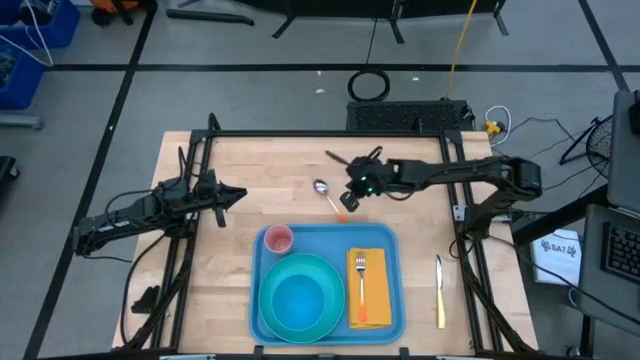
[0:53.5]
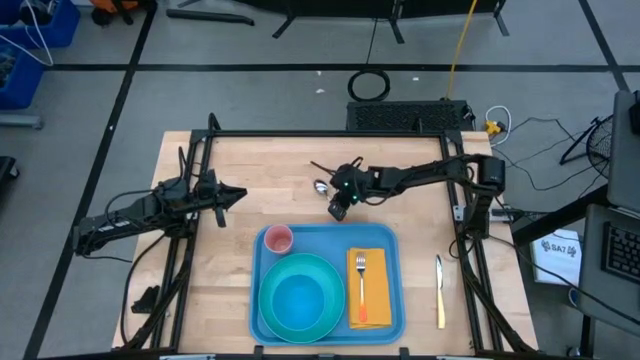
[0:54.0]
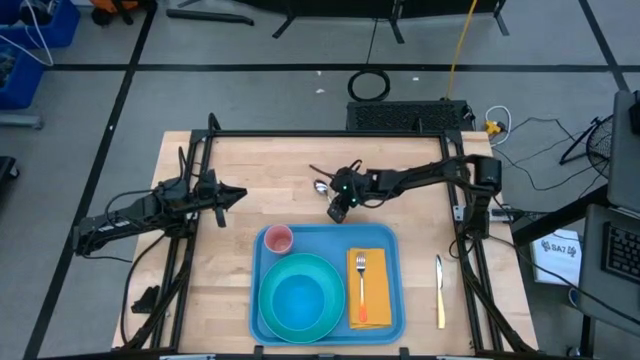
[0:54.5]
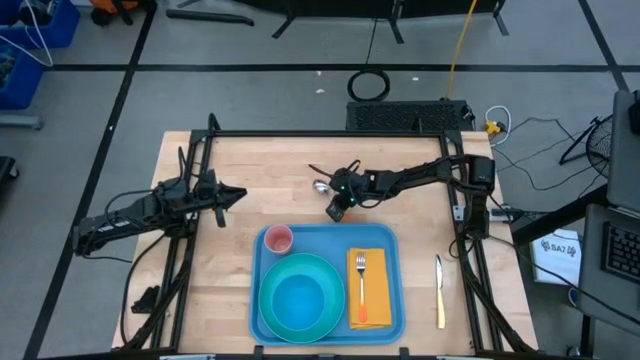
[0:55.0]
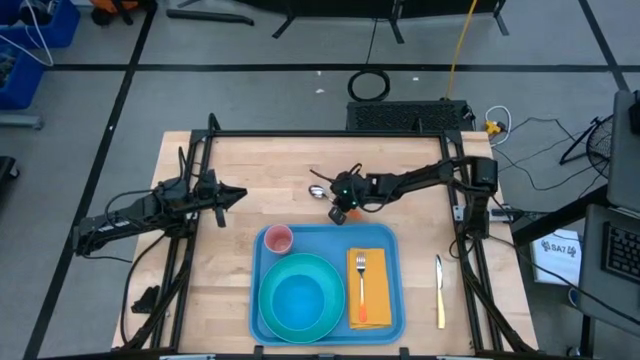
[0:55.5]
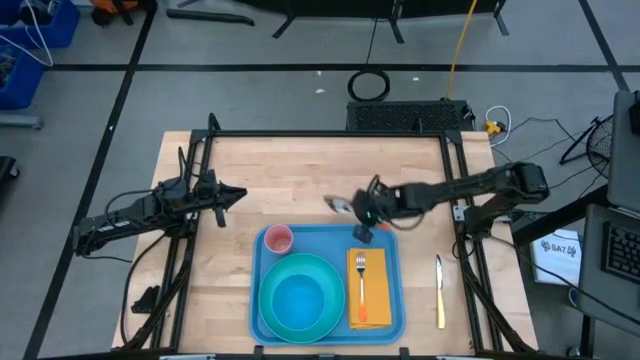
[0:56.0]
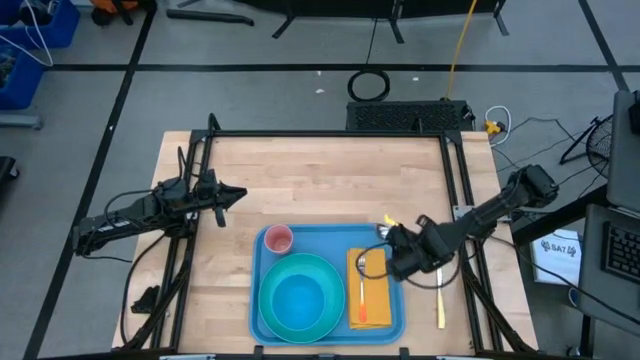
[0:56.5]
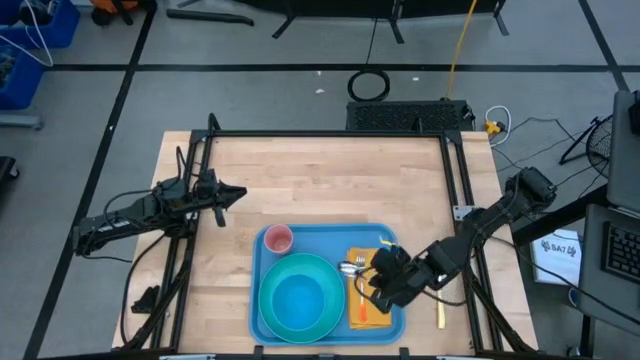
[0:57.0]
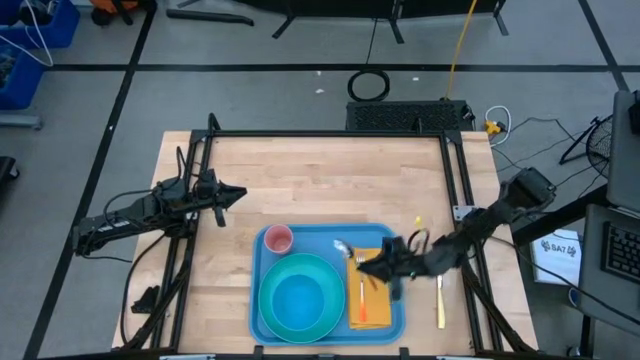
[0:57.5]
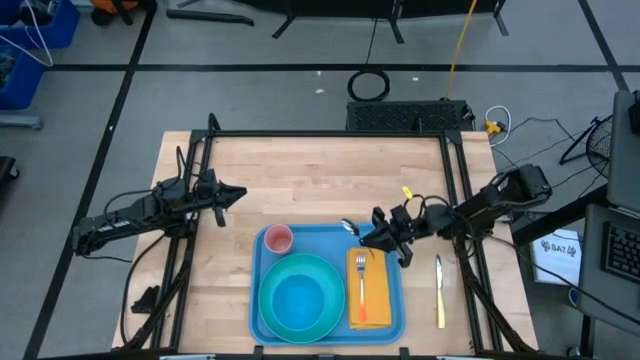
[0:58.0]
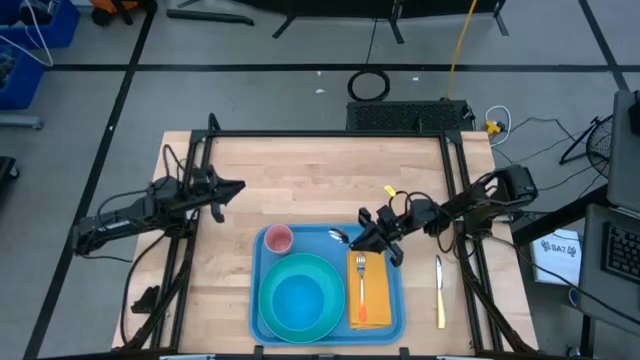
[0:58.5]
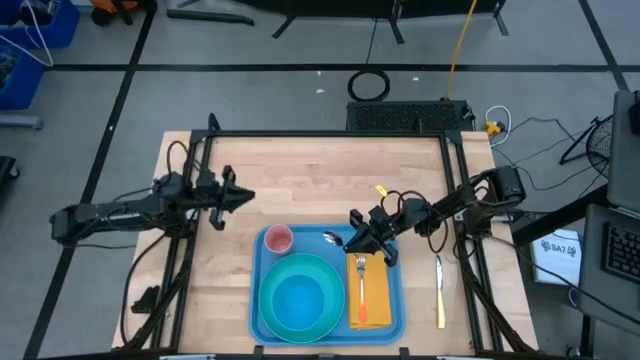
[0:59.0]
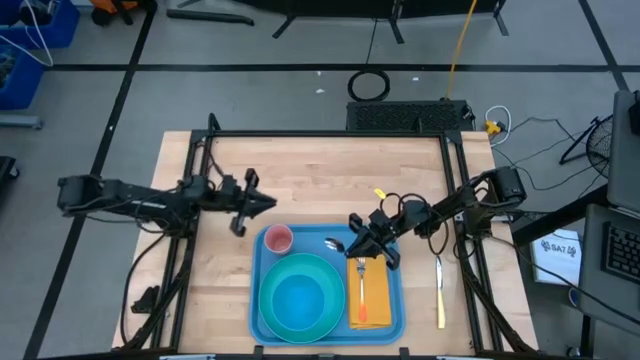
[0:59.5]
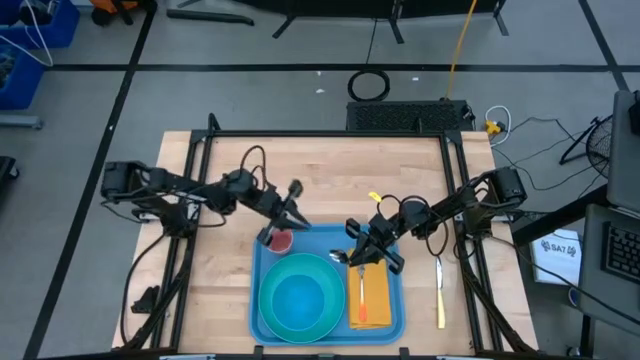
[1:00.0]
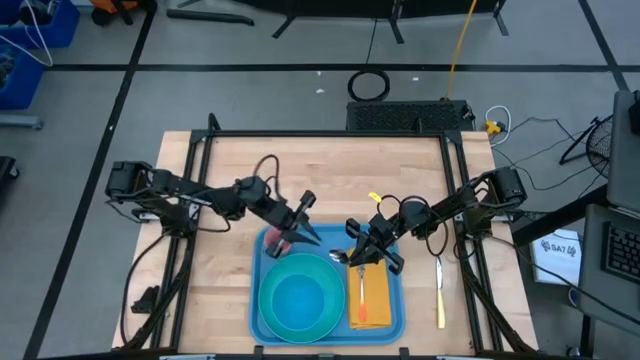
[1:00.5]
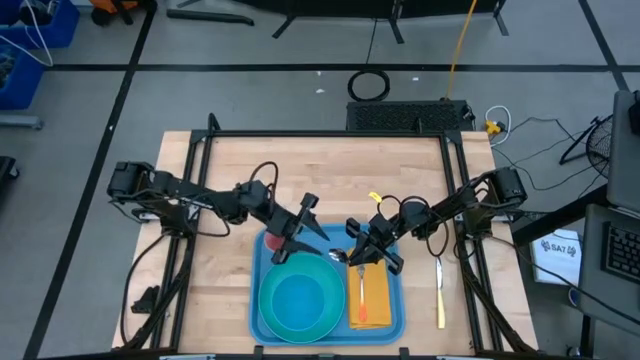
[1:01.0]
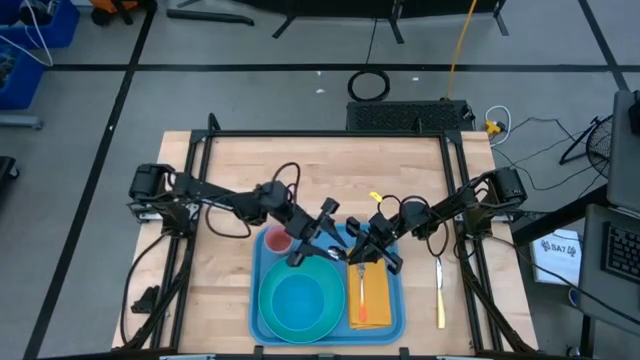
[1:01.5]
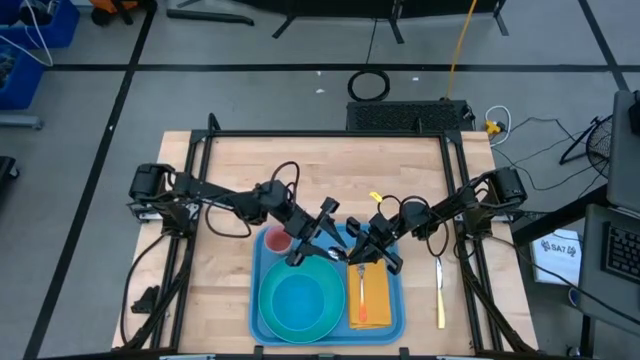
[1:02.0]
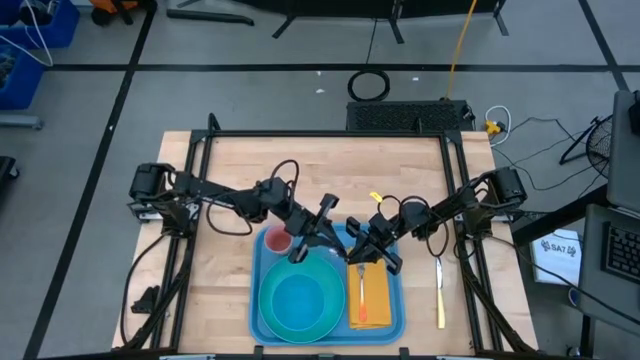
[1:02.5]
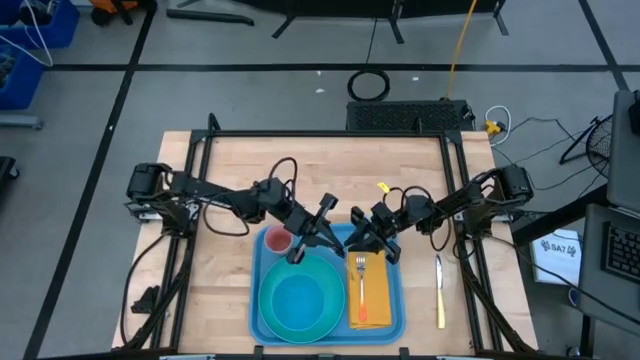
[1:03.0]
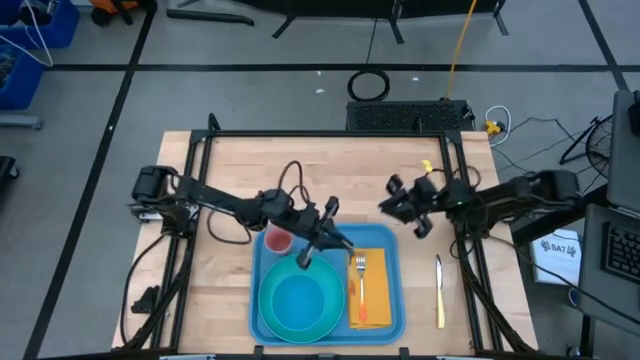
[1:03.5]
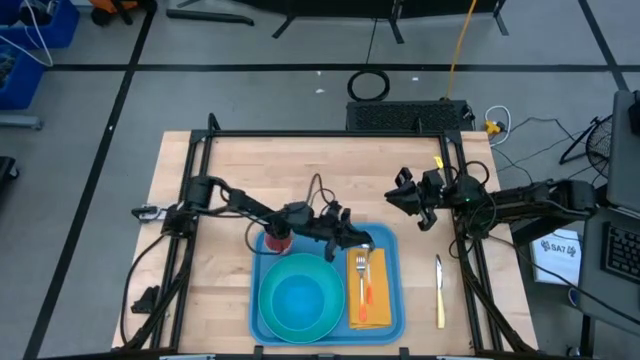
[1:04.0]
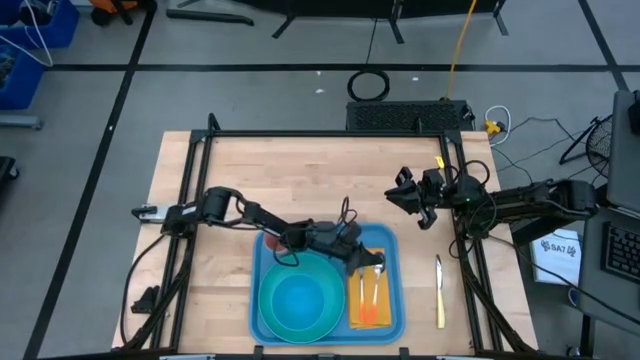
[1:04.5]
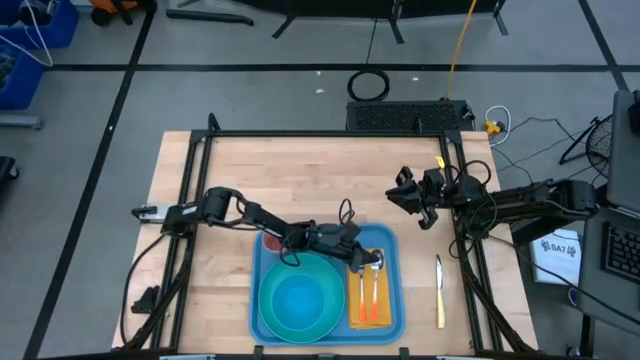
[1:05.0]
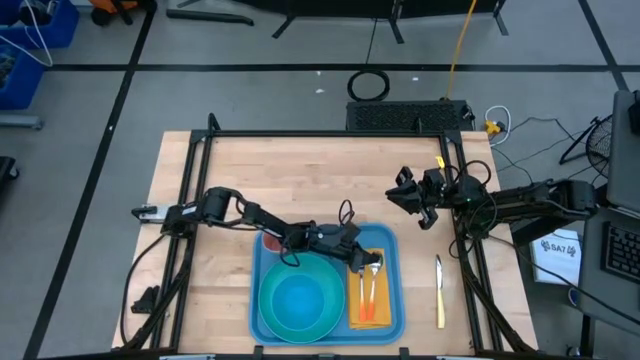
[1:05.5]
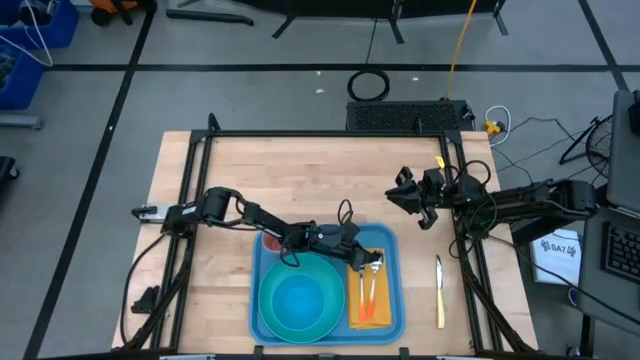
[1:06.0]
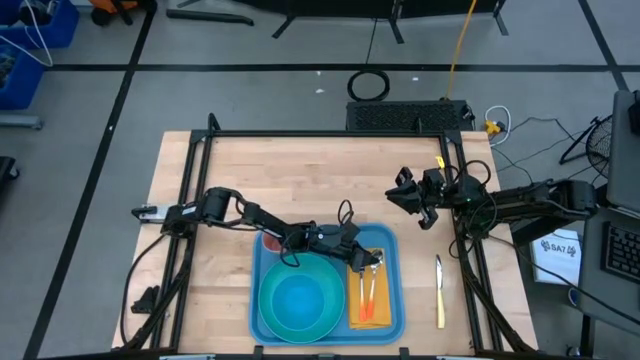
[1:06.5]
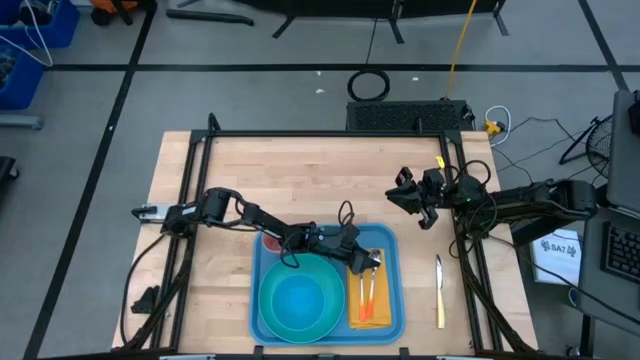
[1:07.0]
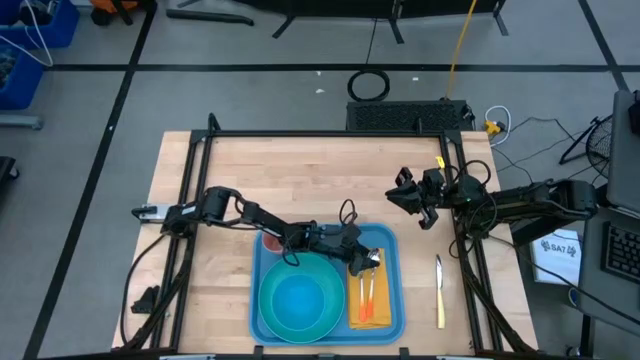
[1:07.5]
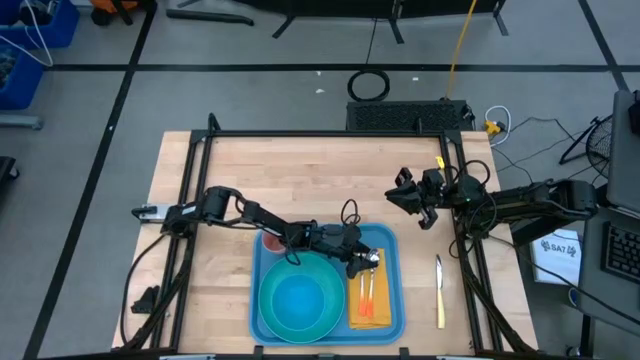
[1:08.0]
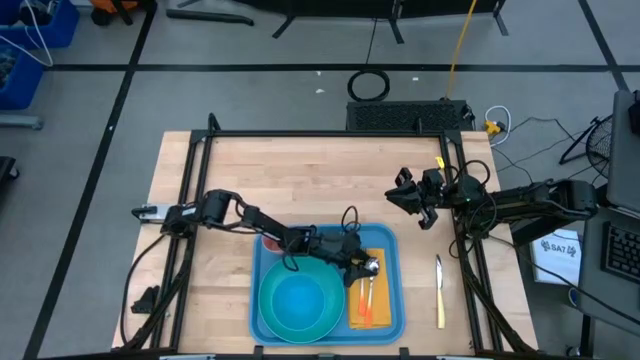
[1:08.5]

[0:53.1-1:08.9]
Task: Set up tray
Put the orange spoon on the yellow napkin to the right of the orange fork

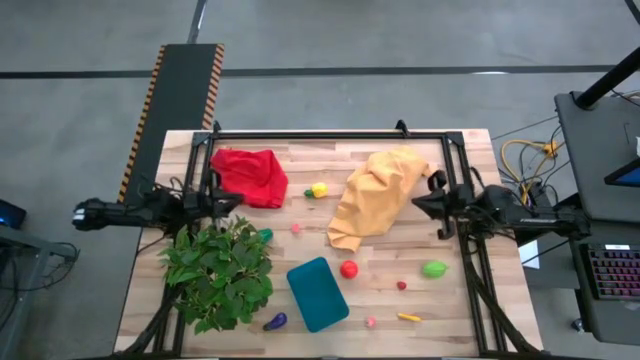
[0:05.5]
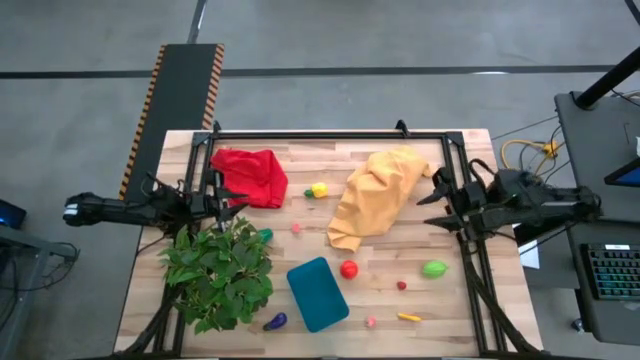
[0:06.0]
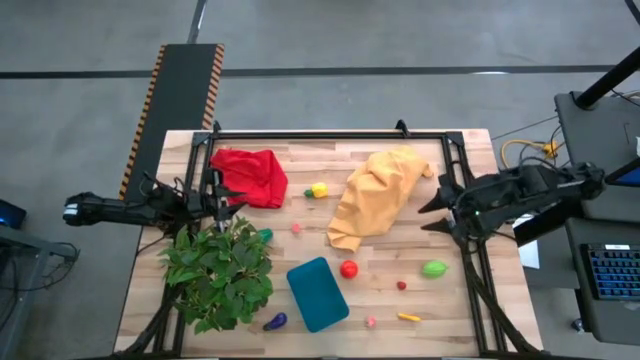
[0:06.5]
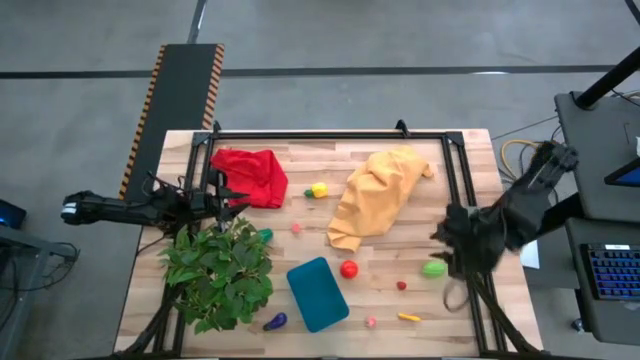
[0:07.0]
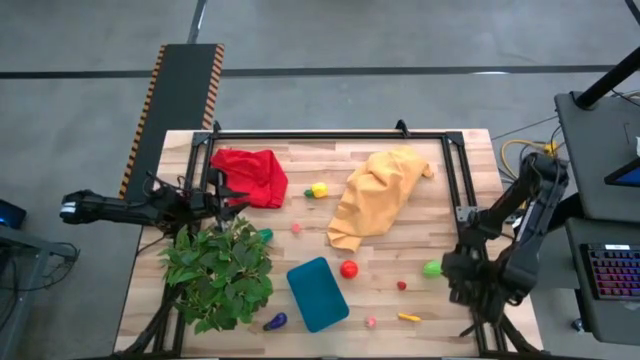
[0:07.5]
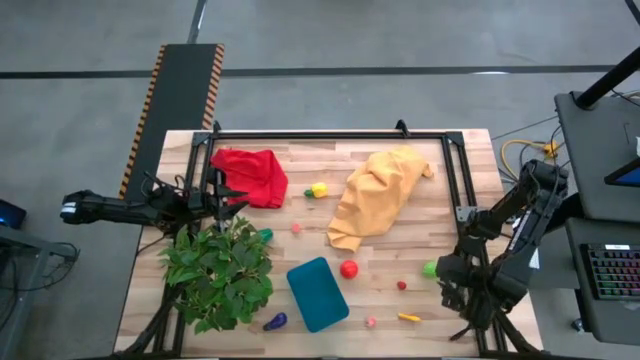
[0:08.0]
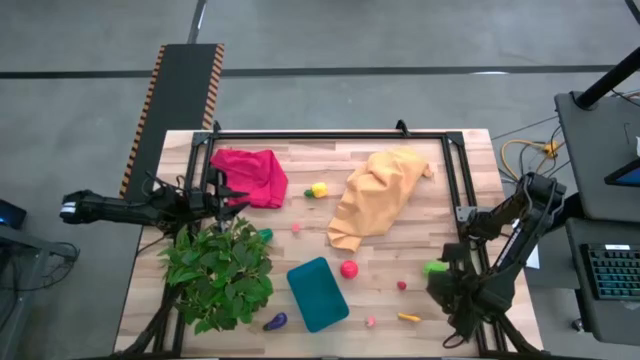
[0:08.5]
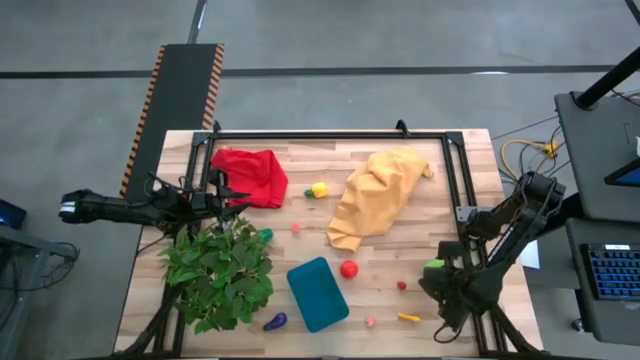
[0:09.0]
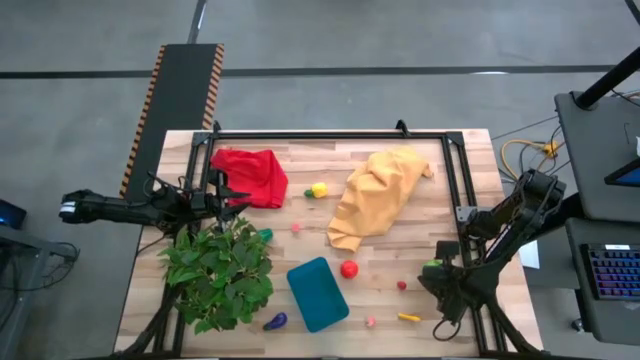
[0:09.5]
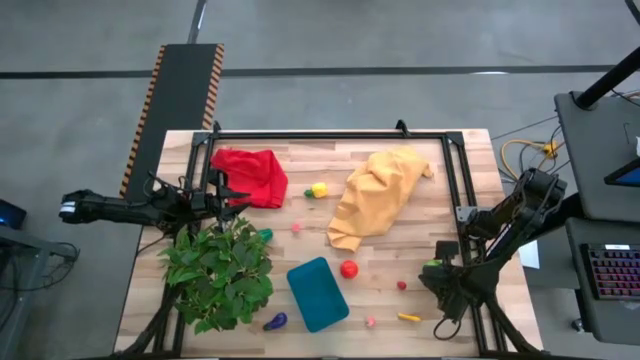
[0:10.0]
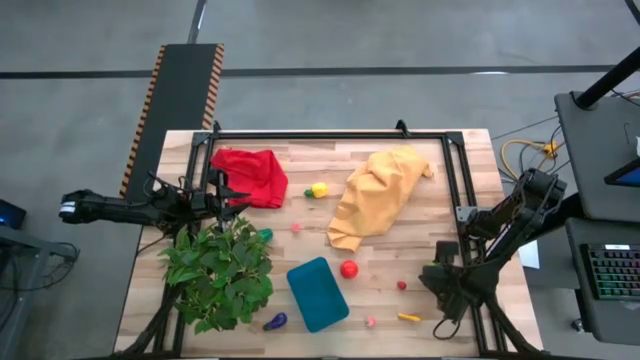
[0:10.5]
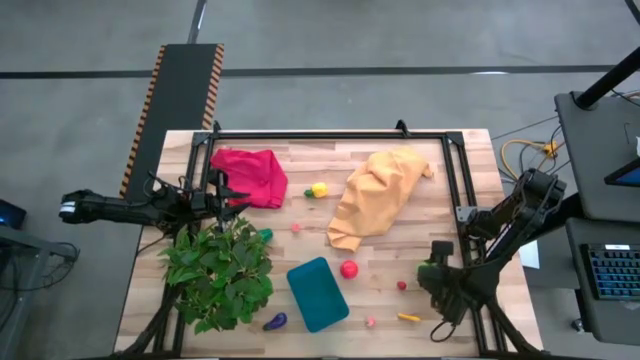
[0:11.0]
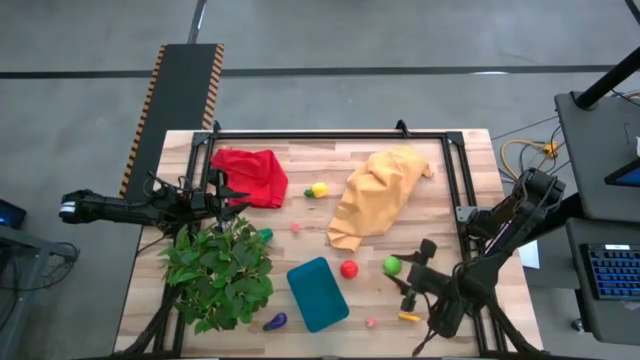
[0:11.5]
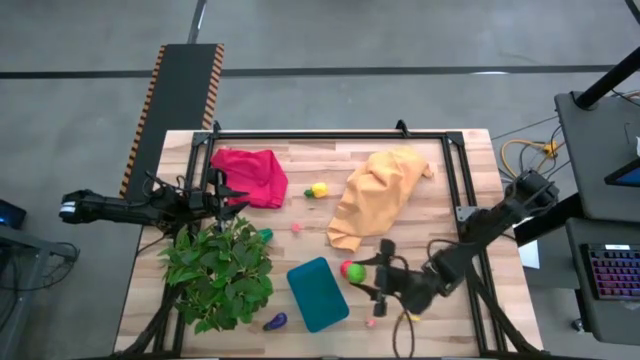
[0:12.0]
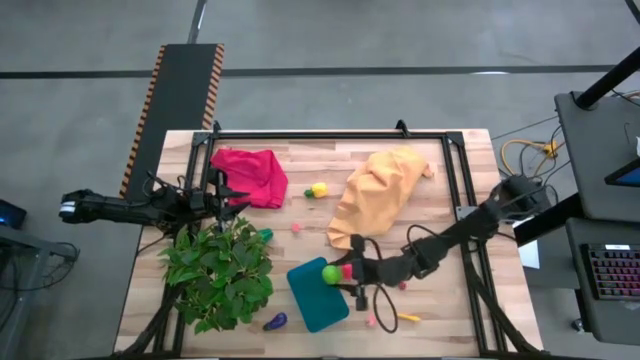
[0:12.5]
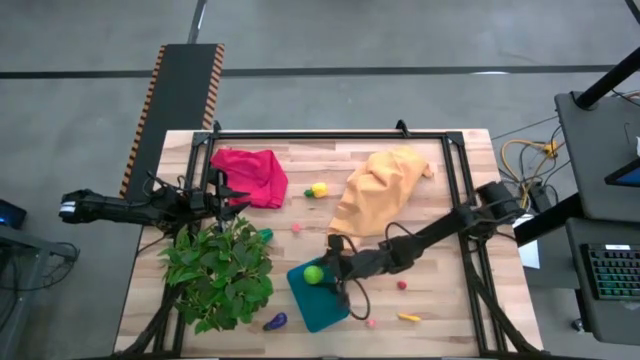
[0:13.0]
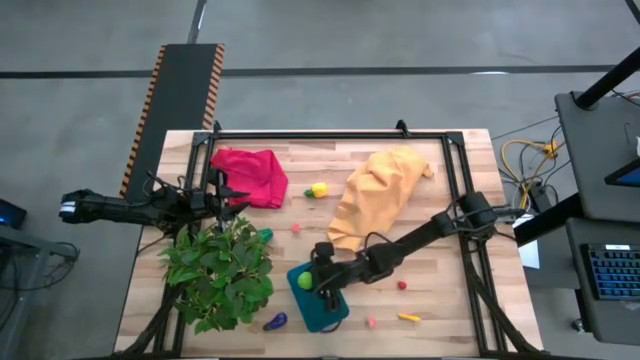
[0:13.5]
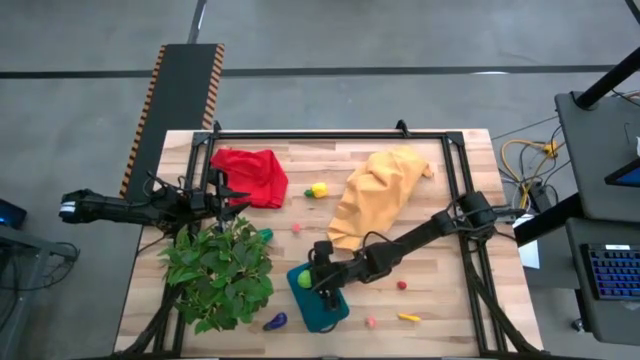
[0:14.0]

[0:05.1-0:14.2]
Task: Pick and placing Produce into tupperware
Put the melon into the bin
